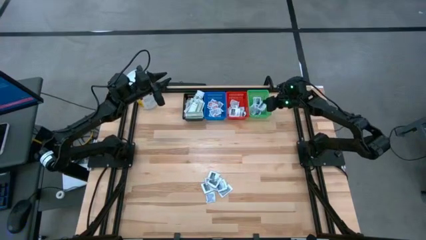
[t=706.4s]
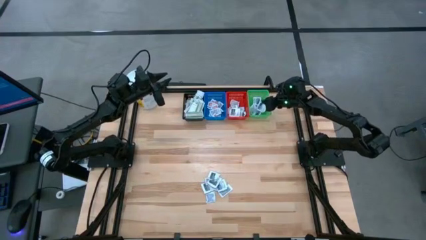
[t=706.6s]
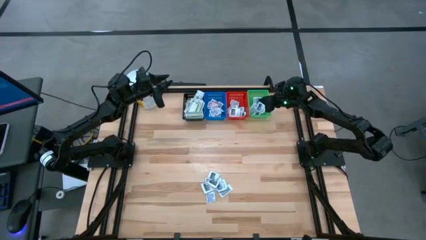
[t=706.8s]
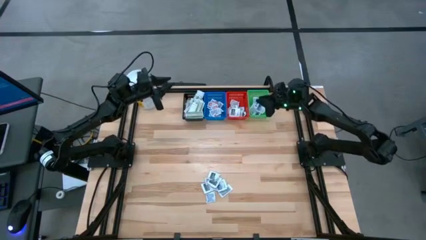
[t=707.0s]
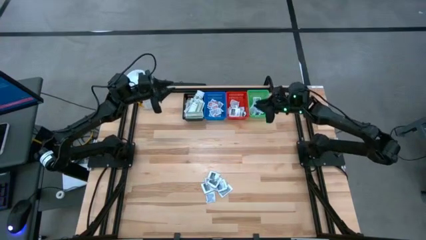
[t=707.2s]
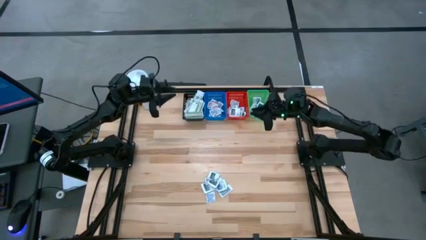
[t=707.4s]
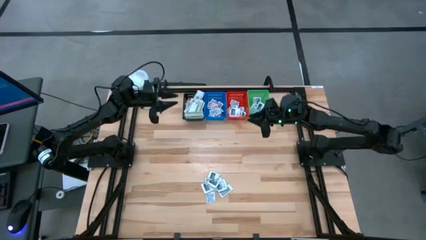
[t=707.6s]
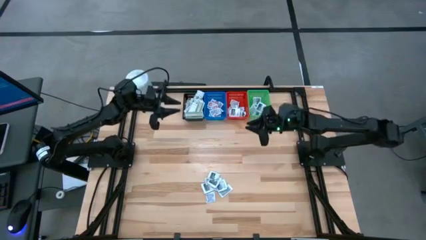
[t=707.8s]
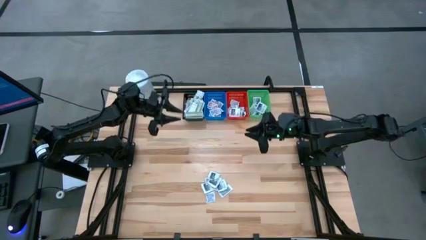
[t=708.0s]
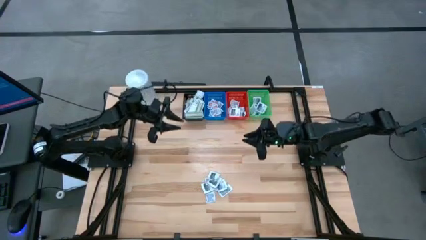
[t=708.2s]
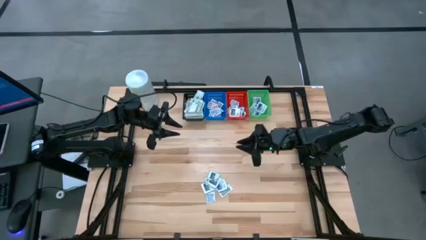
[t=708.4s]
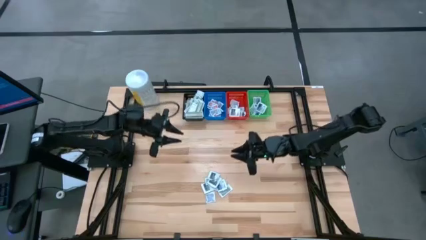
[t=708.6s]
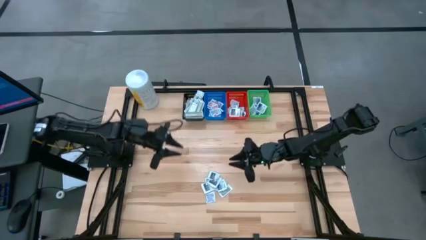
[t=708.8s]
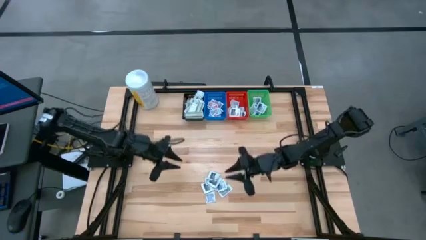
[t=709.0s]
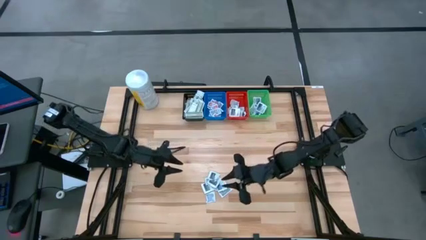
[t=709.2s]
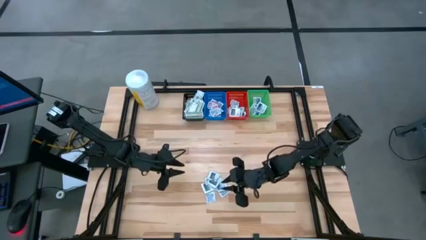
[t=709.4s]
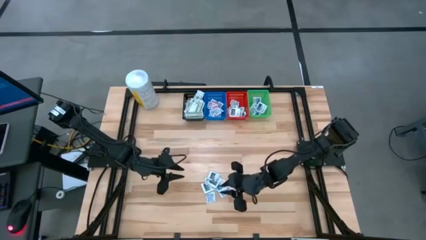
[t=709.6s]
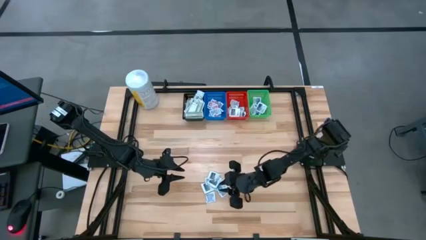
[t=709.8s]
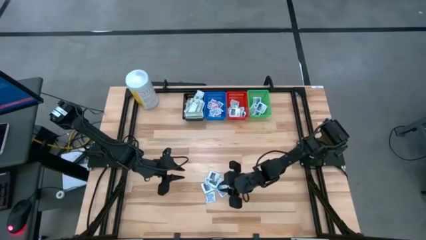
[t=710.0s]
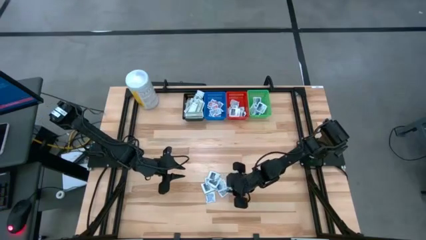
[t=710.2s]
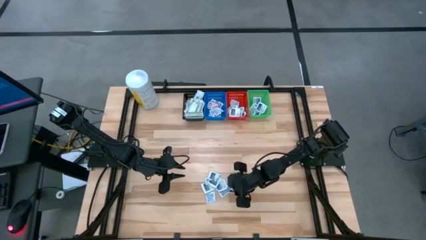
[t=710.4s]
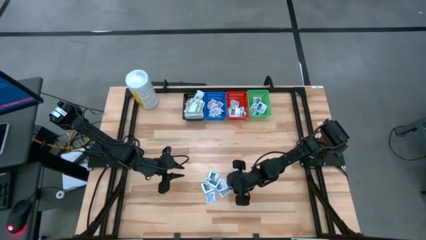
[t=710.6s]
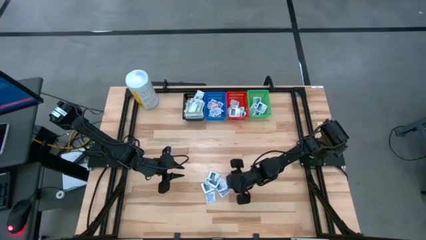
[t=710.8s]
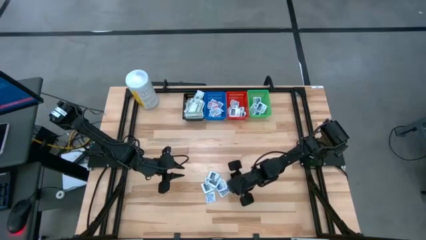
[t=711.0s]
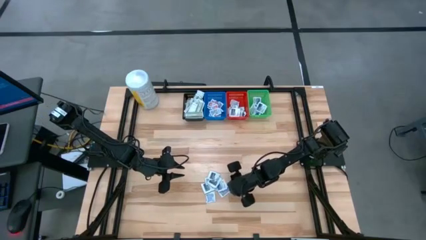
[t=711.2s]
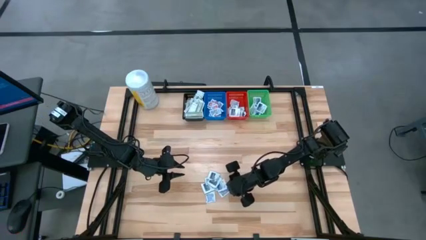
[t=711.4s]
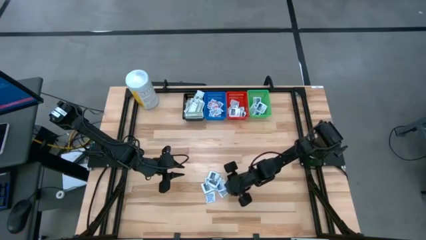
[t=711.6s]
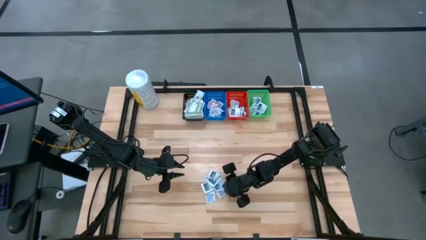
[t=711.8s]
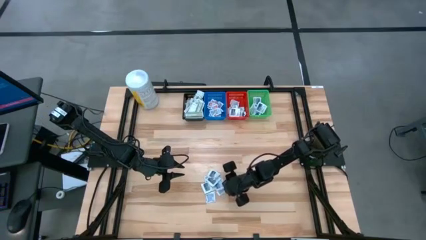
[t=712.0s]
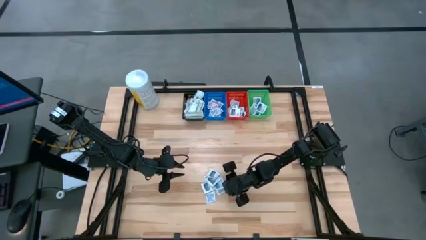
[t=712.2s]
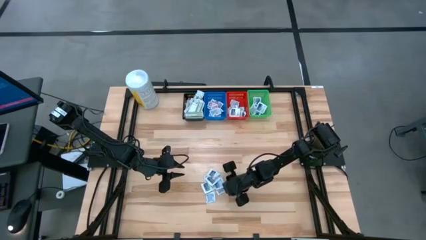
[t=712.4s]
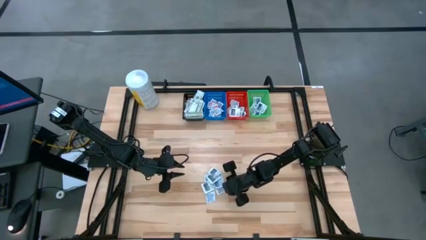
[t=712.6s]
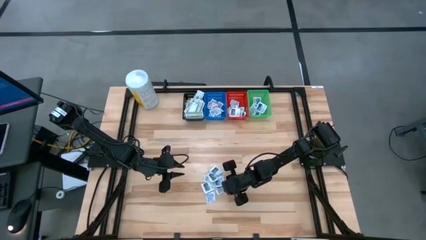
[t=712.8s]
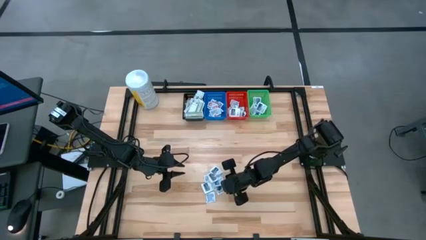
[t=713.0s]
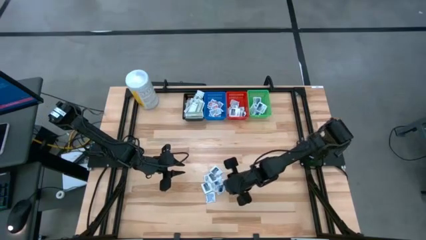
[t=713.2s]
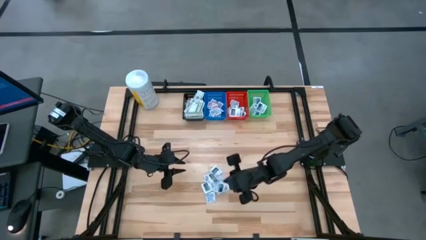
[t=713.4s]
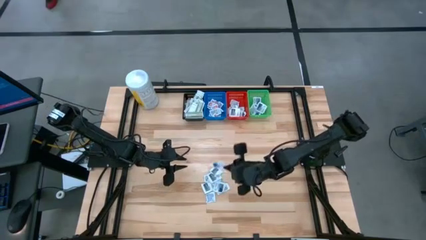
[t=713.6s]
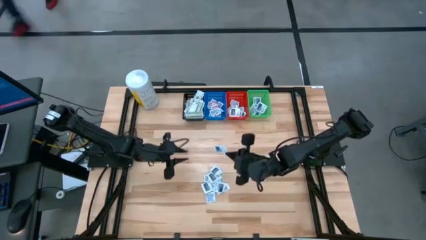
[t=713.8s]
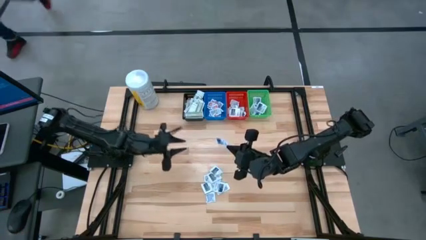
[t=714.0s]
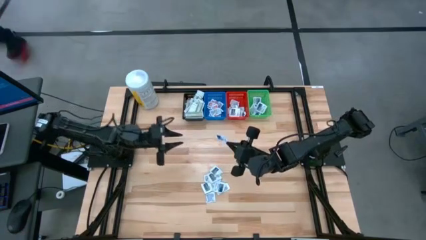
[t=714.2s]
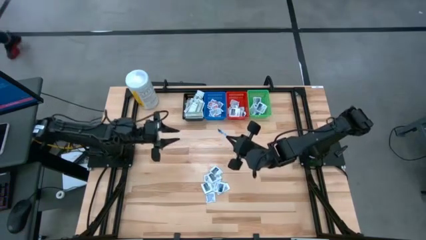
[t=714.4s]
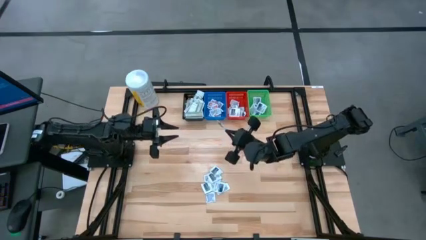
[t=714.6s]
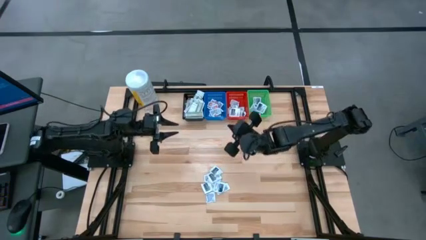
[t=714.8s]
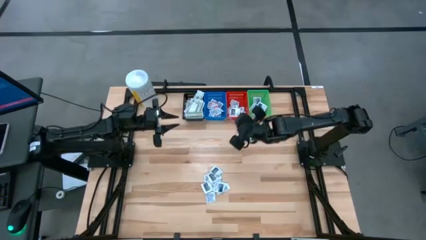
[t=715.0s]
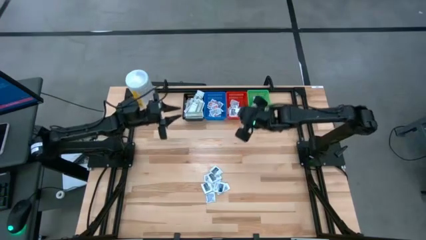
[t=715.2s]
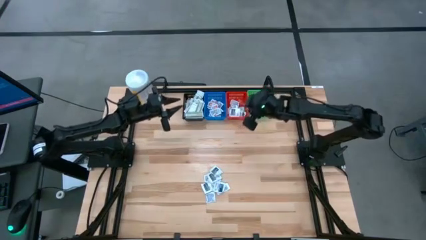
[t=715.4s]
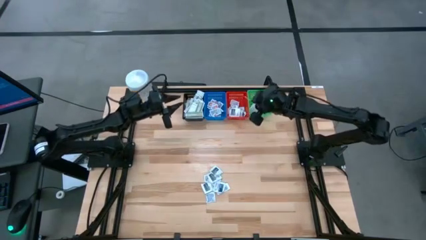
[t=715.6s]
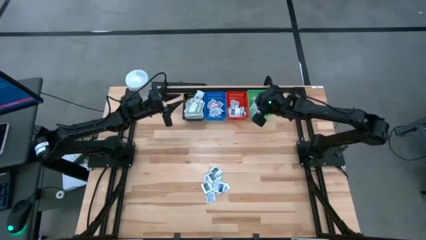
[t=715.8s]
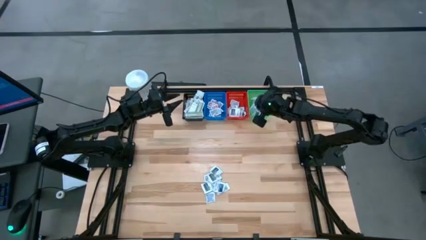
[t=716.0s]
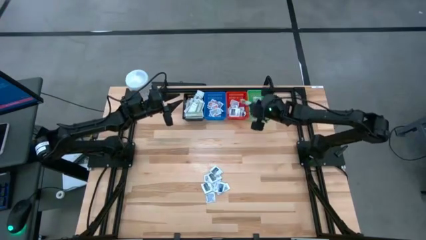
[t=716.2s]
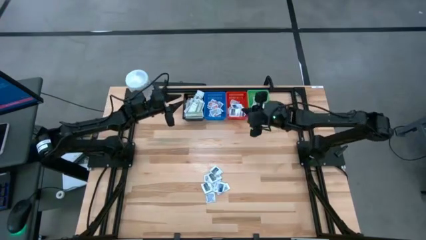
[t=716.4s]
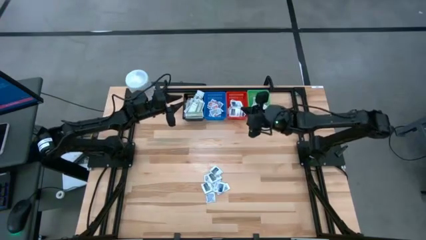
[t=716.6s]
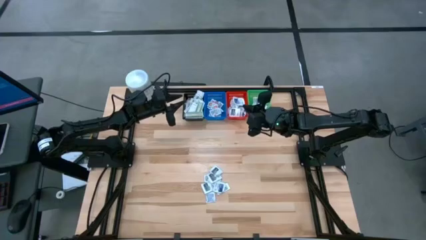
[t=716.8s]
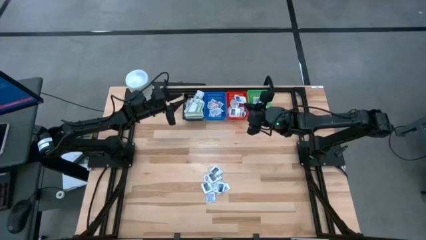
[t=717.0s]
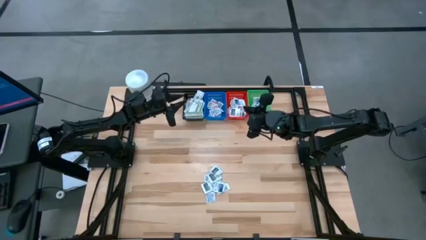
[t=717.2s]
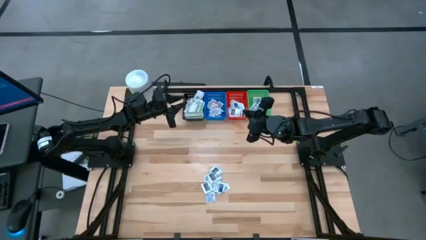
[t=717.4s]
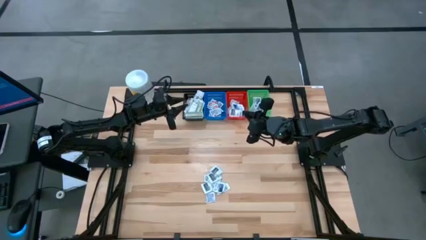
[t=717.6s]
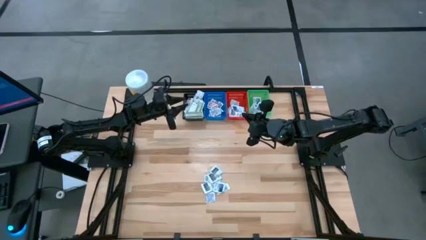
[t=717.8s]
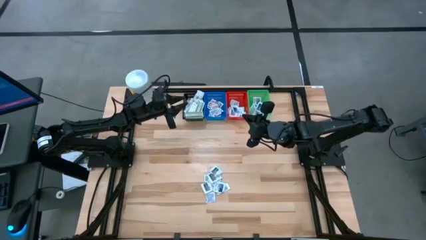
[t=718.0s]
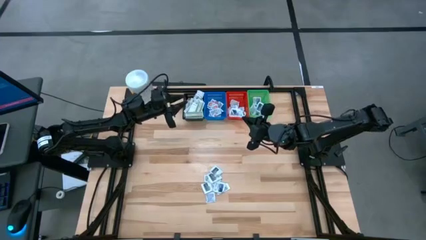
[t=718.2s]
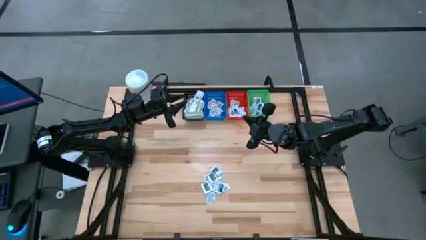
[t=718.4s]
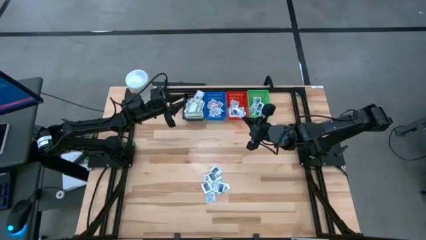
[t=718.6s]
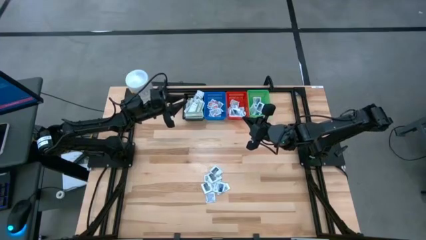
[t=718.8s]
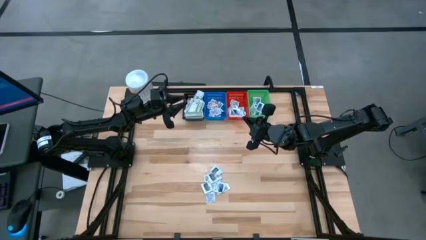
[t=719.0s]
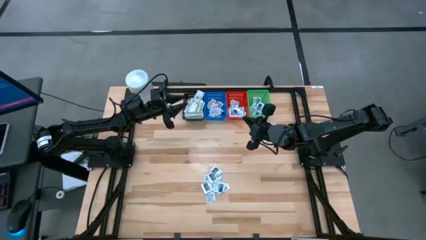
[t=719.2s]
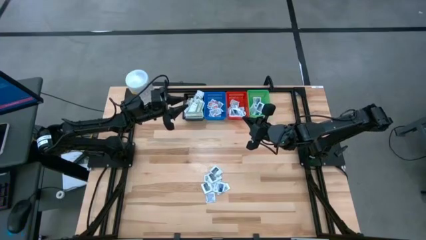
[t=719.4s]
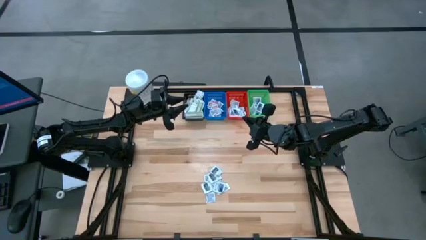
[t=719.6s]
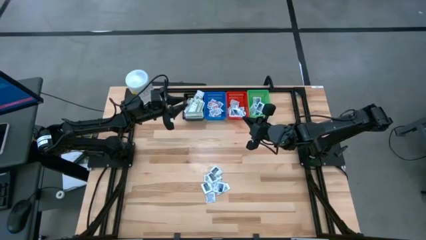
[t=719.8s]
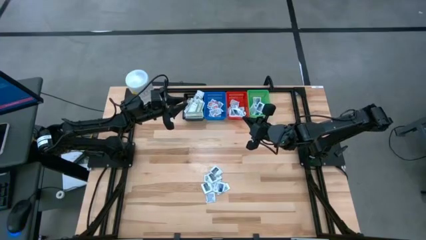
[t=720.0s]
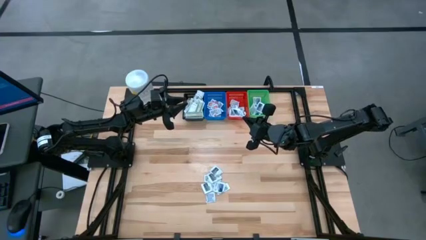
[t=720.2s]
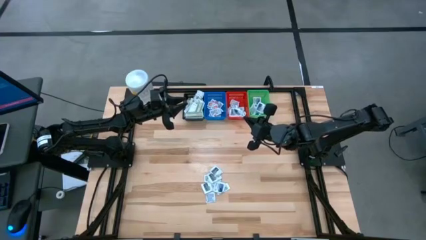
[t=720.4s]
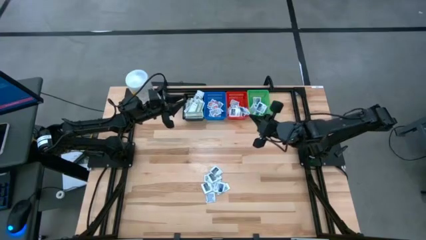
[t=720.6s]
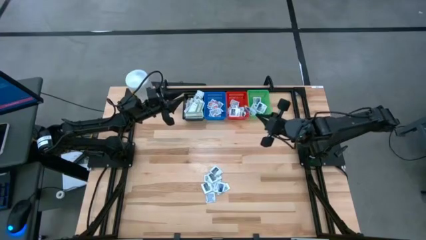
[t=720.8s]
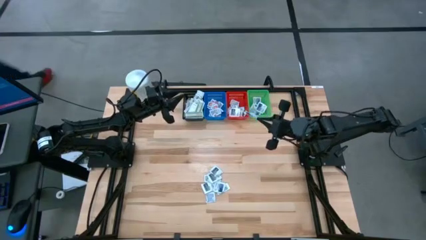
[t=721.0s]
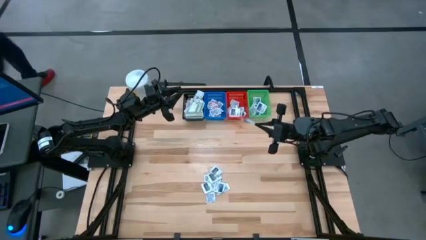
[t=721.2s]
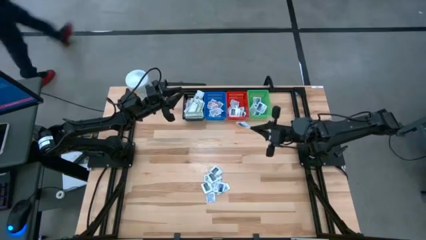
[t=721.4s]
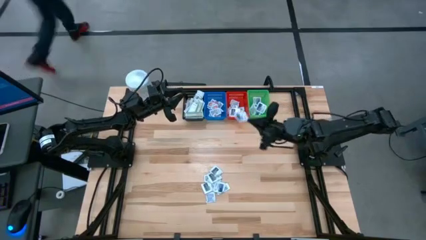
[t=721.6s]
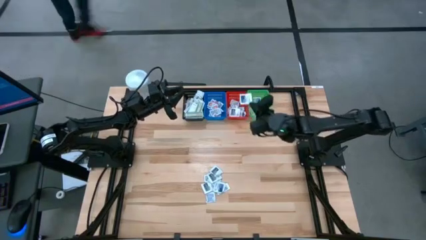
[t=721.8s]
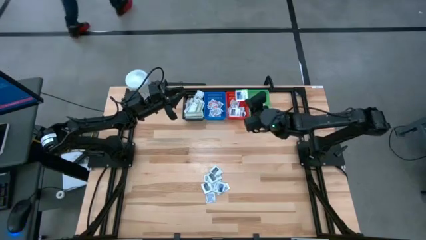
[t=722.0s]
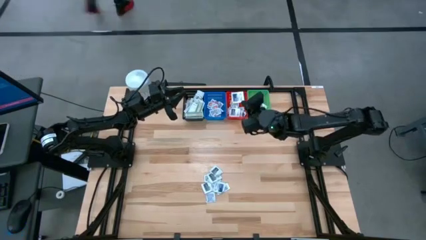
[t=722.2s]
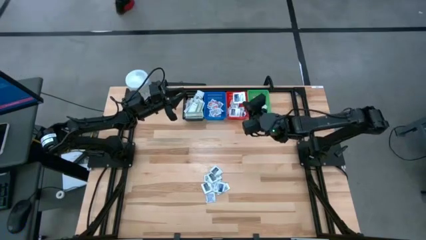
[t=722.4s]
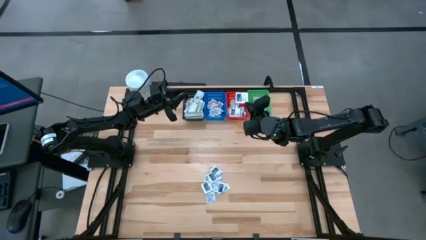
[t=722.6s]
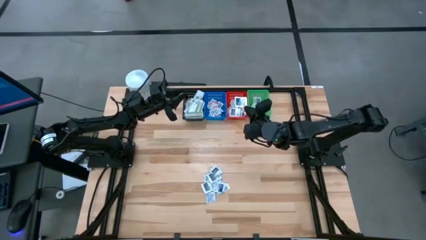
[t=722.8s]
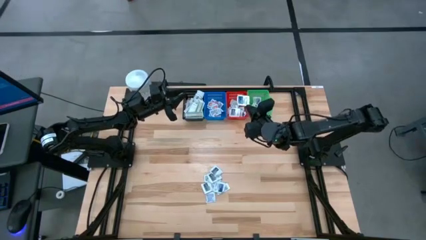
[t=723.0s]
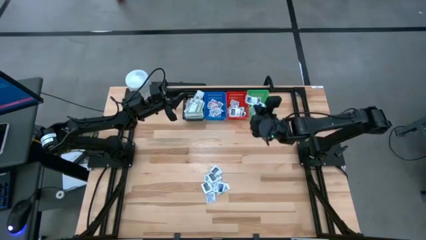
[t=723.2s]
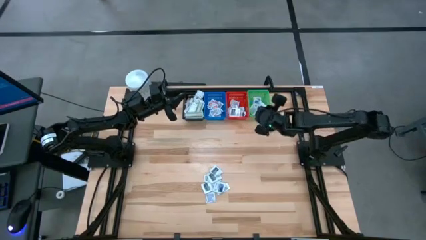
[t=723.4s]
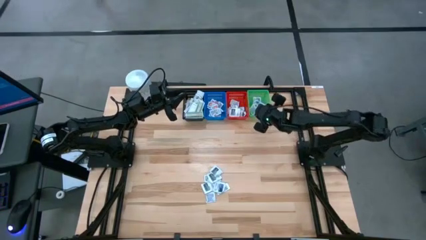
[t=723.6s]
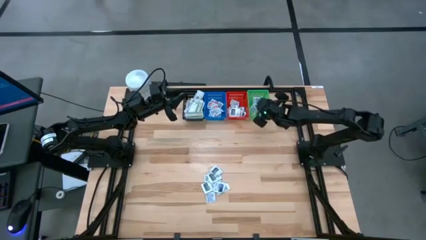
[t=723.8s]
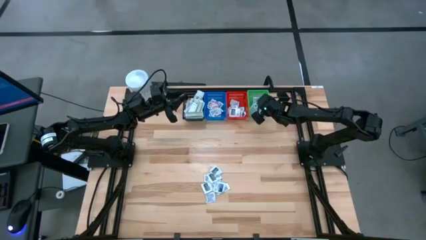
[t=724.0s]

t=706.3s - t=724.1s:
Task: Pick & Place First Aid Supplies
Put the blue alcohol pad in the green bin
